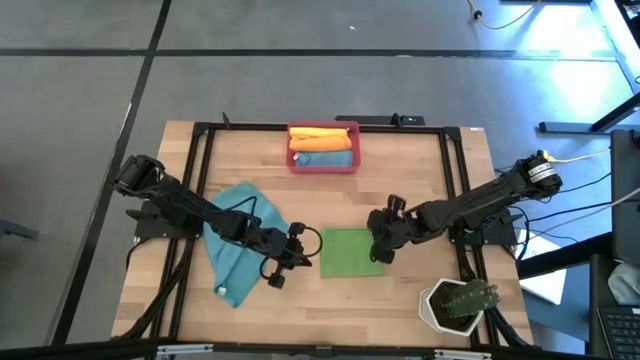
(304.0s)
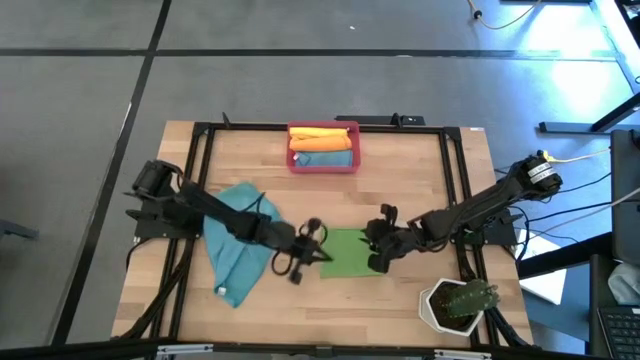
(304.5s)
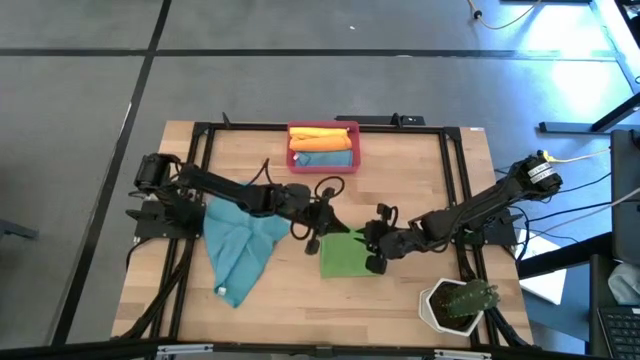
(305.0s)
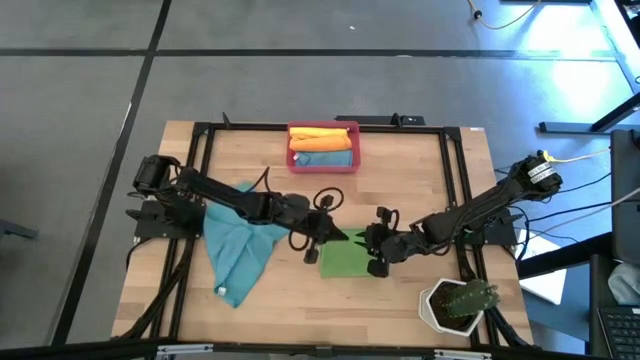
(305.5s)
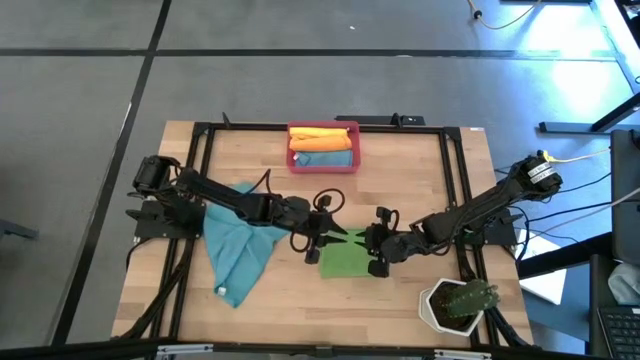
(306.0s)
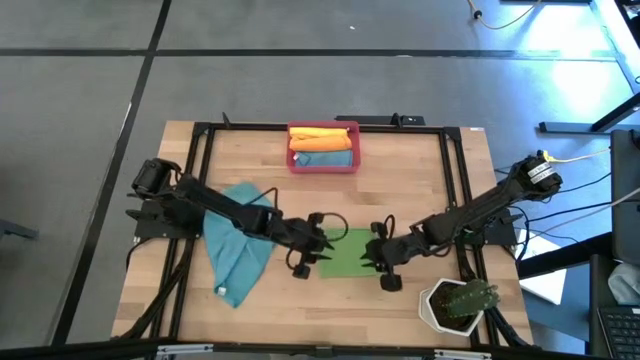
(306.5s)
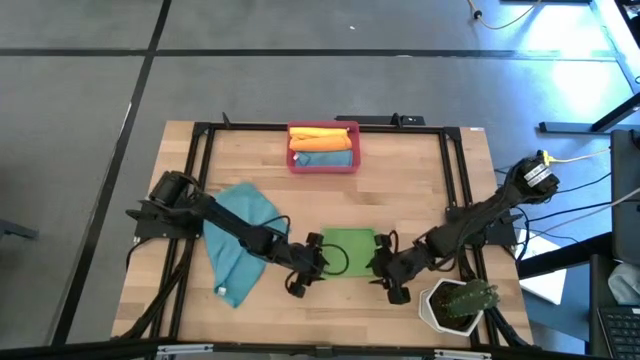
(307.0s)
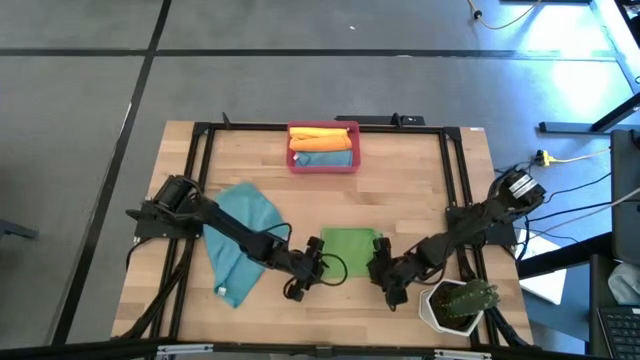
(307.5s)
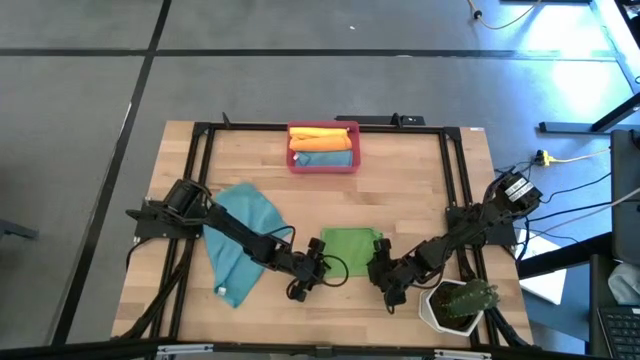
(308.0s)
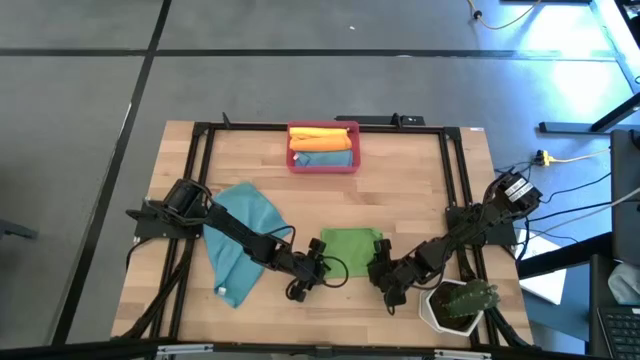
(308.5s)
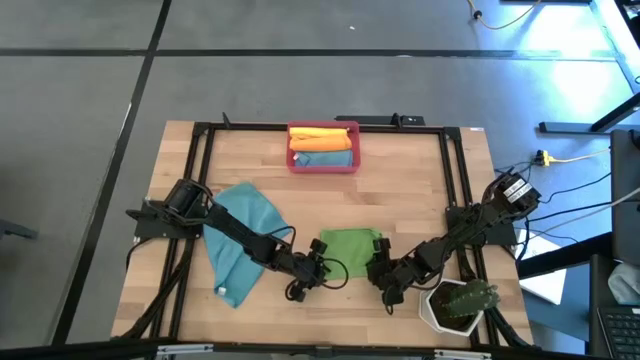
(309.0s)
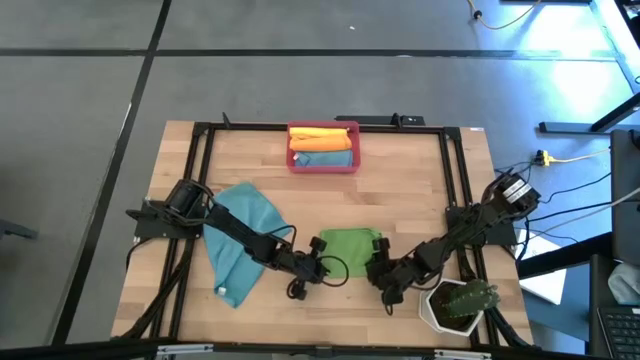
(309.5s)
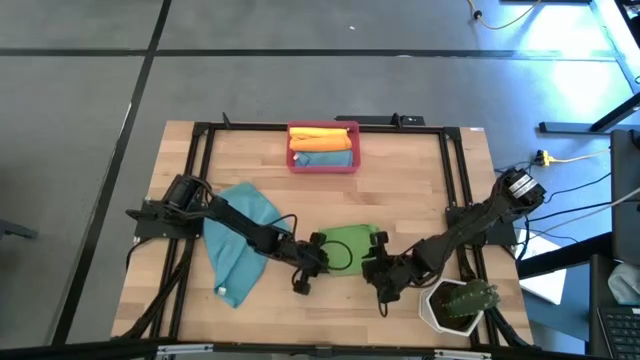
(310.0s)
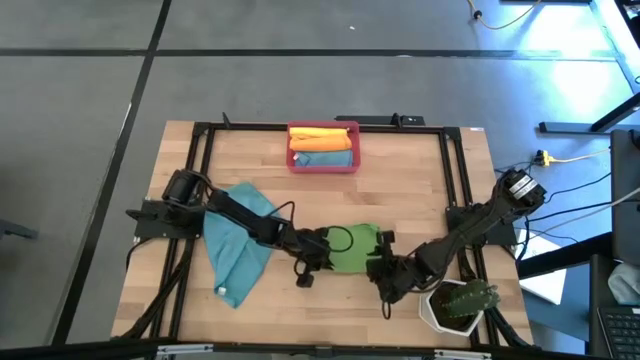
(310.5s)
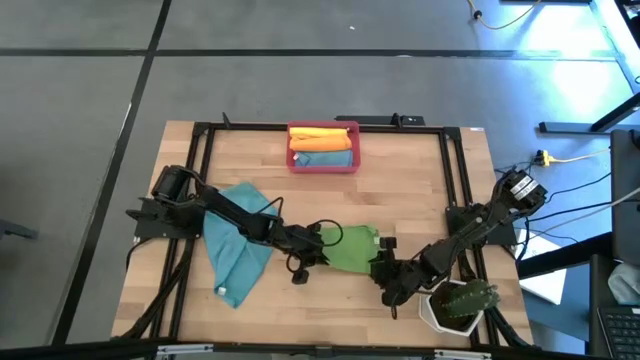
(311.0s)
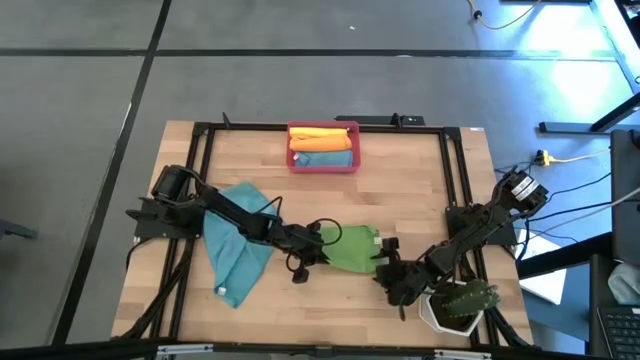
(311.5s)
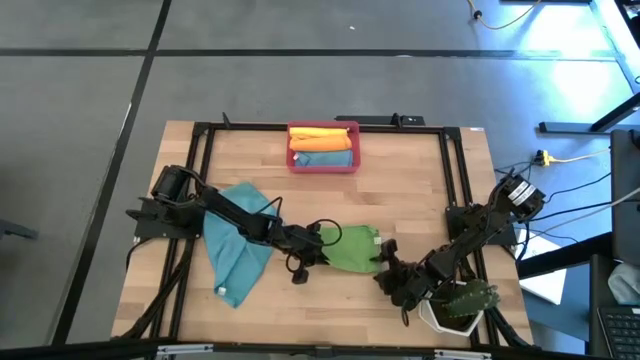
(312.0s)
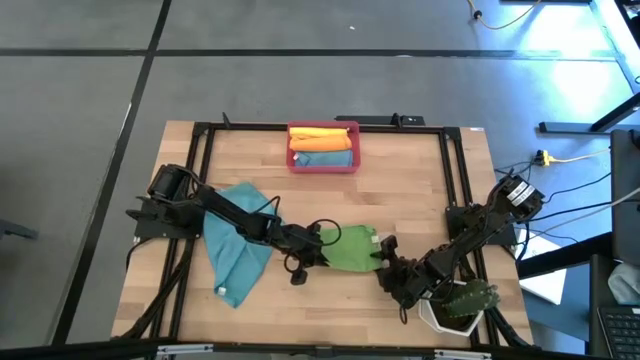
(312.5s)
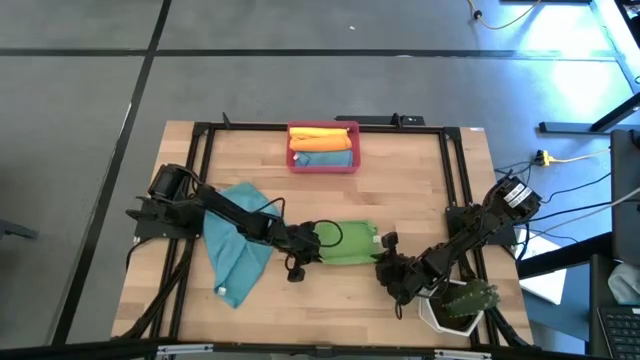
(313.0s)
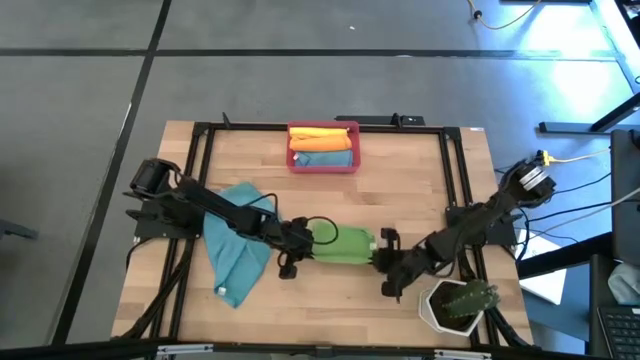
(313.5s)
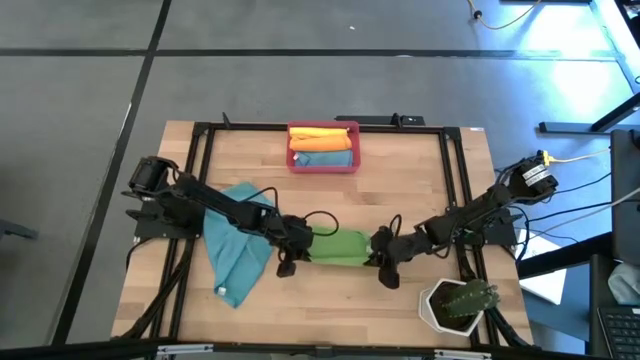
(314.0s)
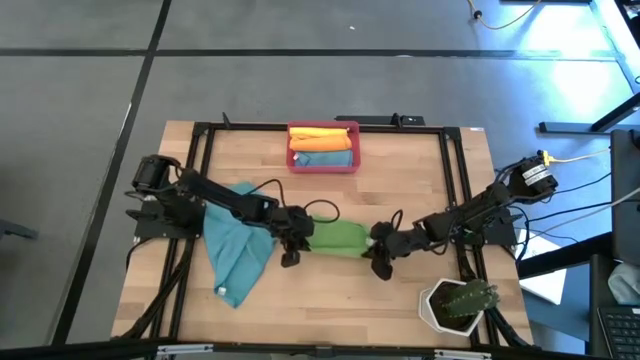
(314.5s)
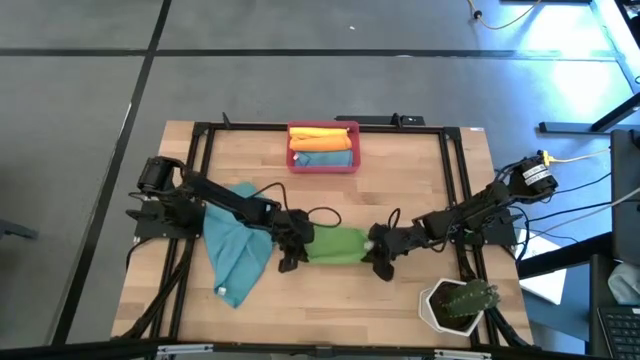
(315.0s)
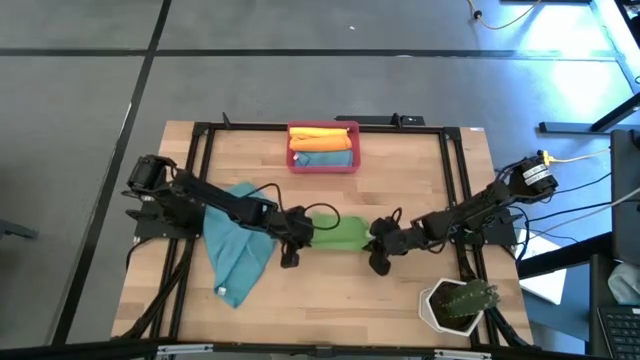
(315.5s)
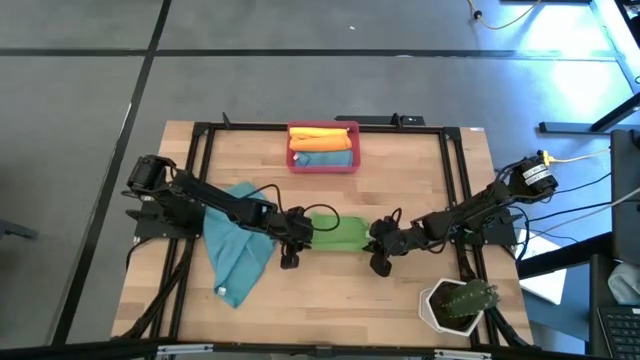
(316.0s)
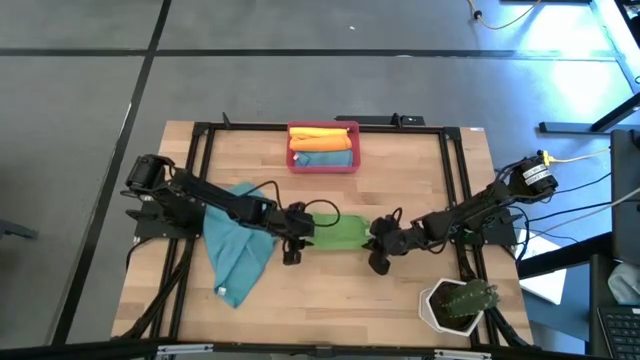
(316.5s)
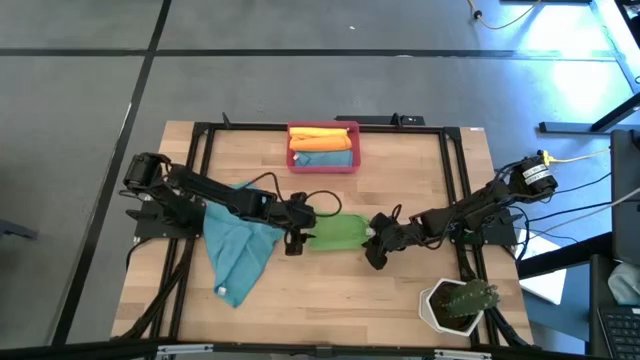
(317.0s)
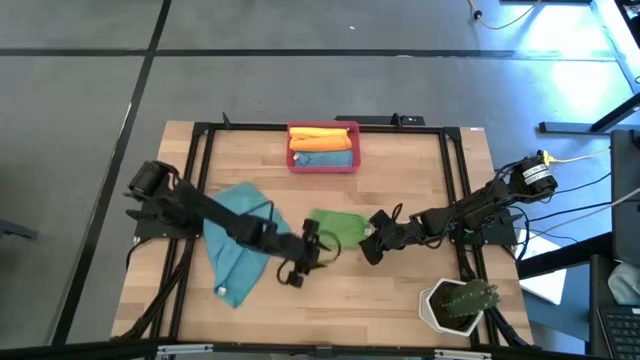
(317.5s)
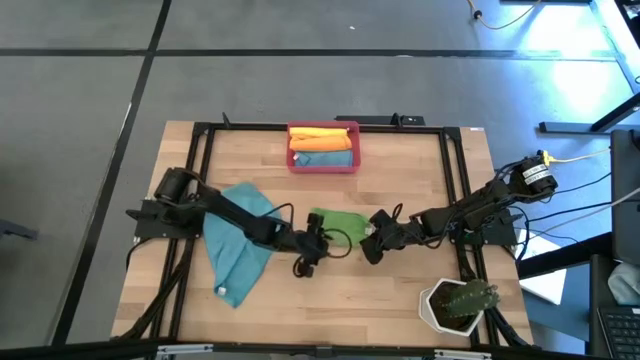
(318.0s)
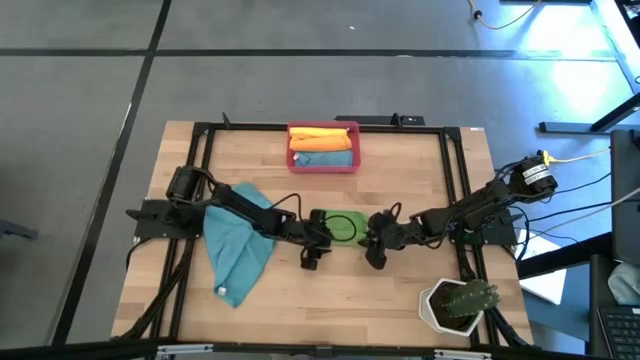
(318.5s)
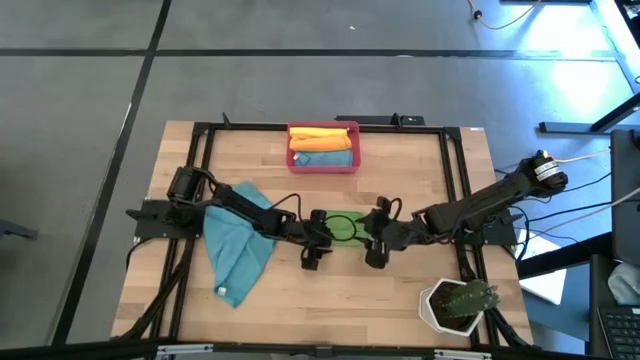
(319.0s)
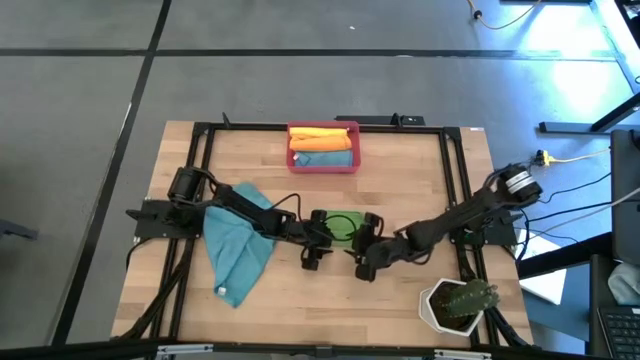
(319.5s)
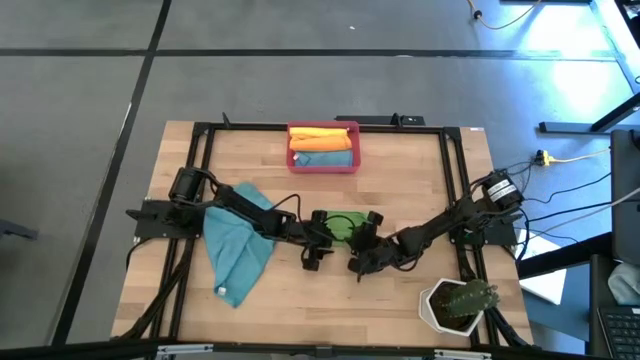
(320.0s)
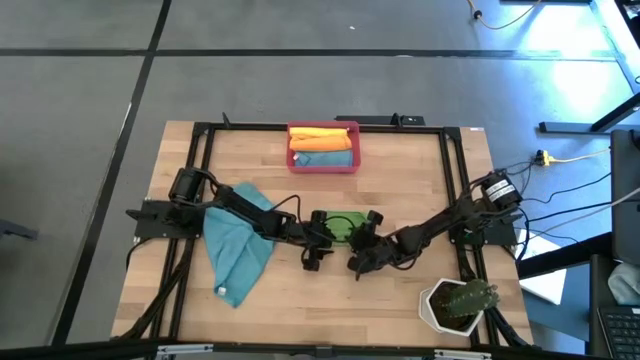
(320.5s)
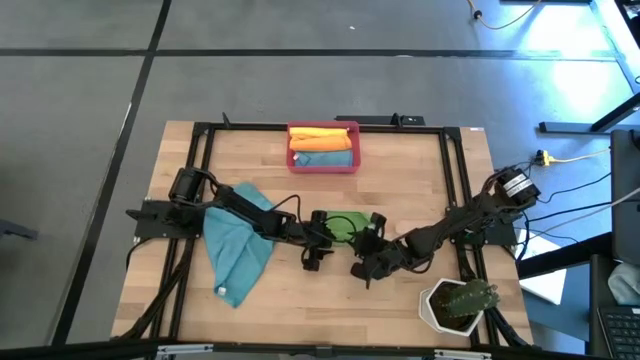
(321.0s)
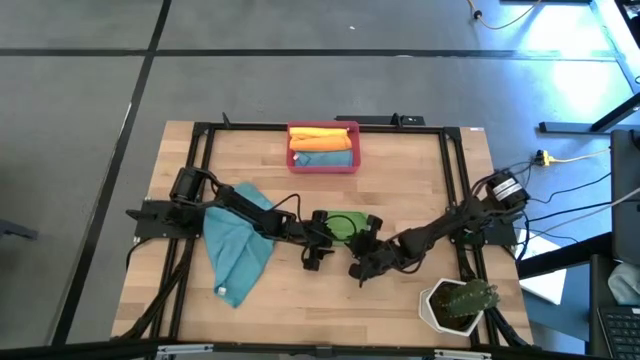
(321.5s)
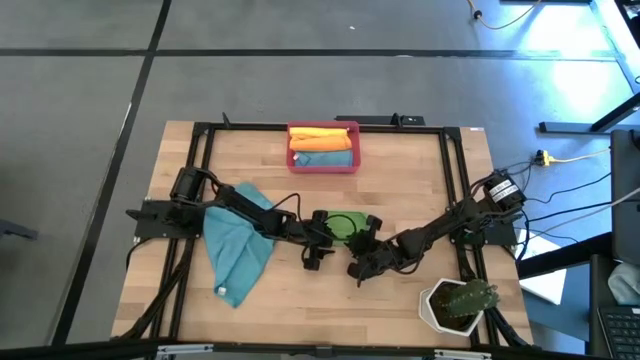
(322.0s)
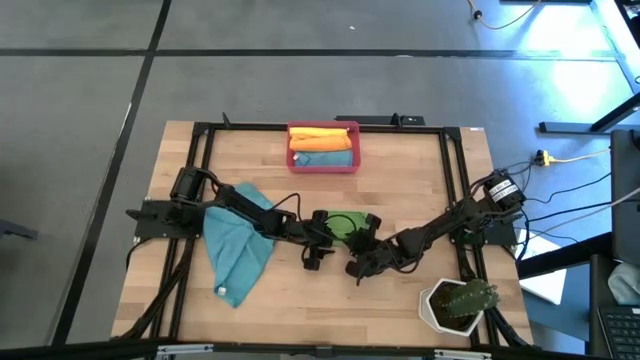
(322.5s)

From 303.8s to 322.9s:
Task: Roll microfiber towels into tight, uniform cylinder then place into a basket
Roll the green microfiber towel

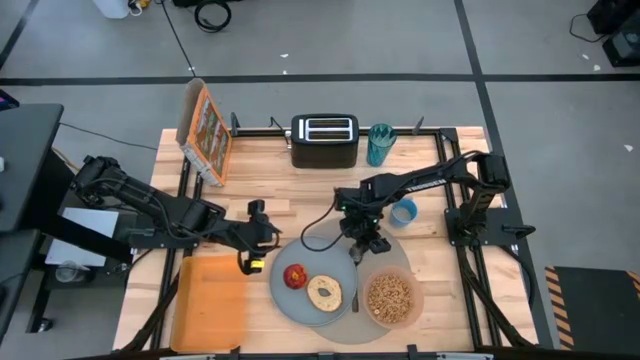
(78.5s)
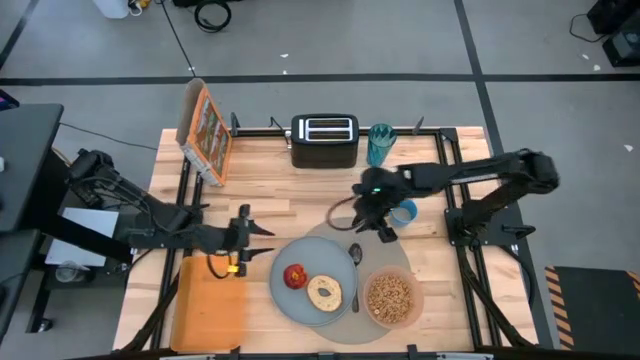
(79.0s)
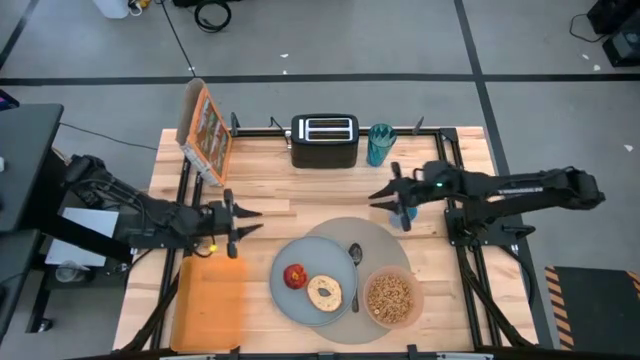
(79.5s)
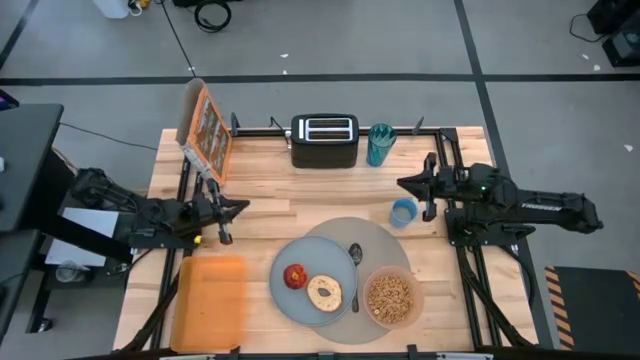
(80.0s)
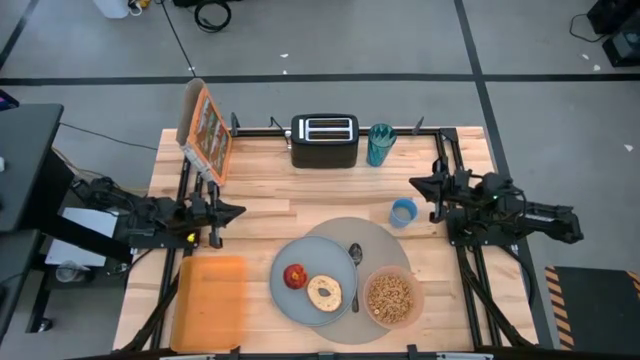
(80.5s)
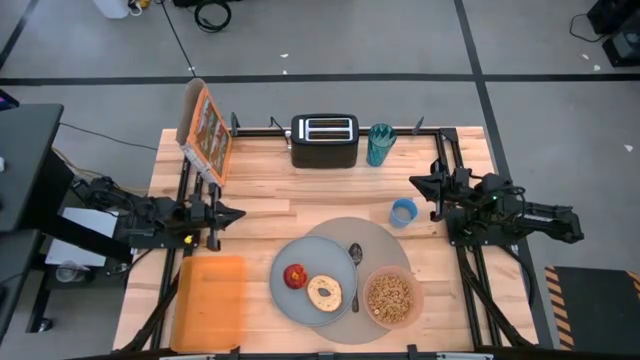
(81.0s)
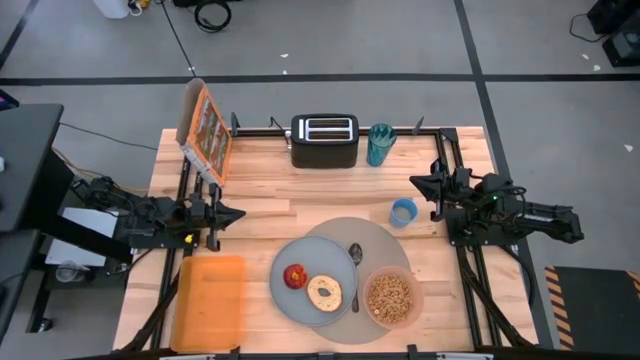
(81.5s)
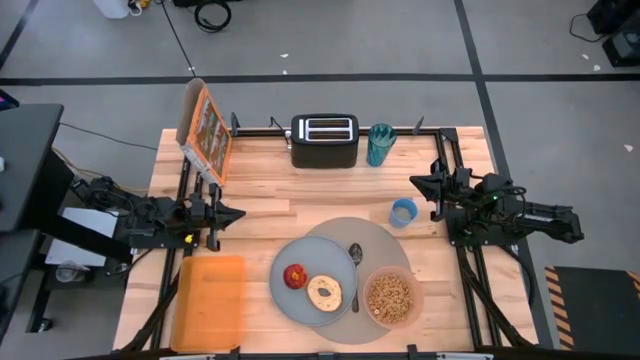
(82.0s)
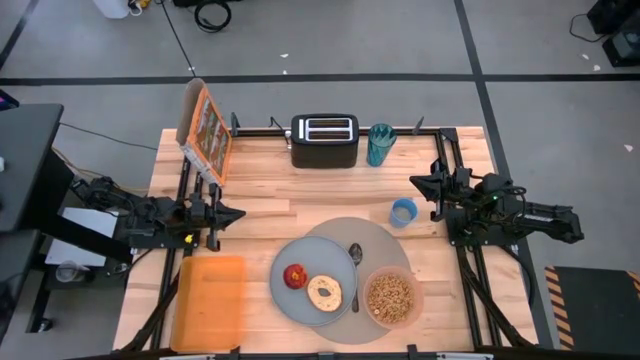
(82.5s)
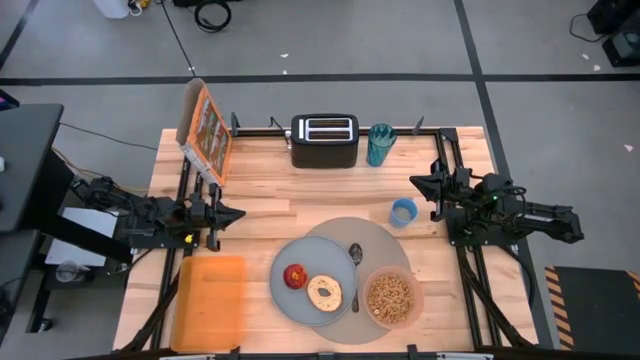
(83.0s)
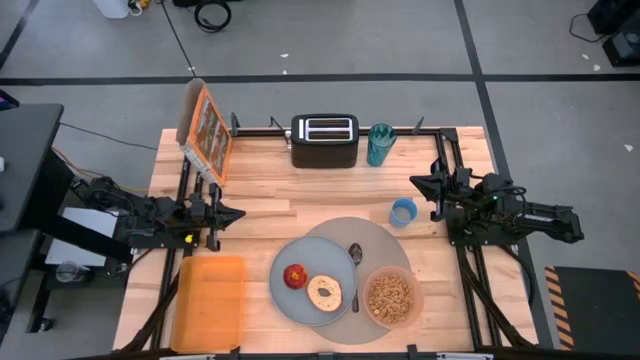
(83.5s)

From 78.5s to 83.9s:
Task: Arrange a breakfast setting
Return to home position
